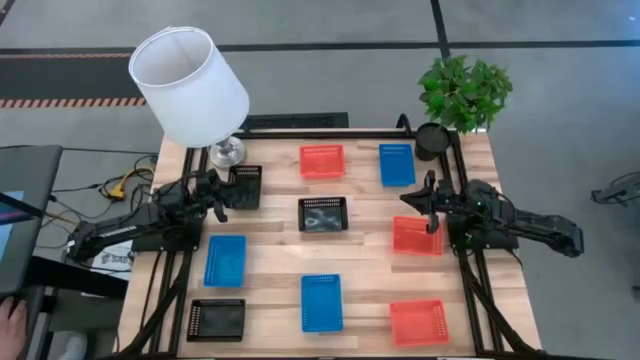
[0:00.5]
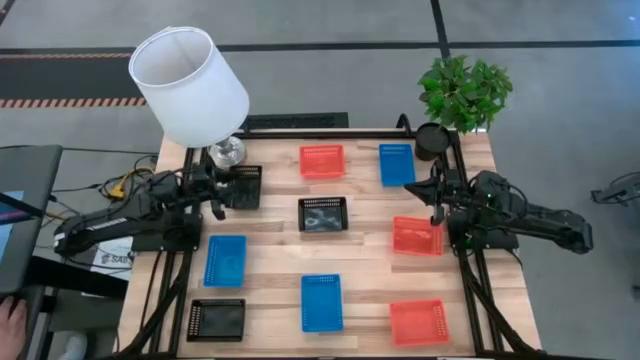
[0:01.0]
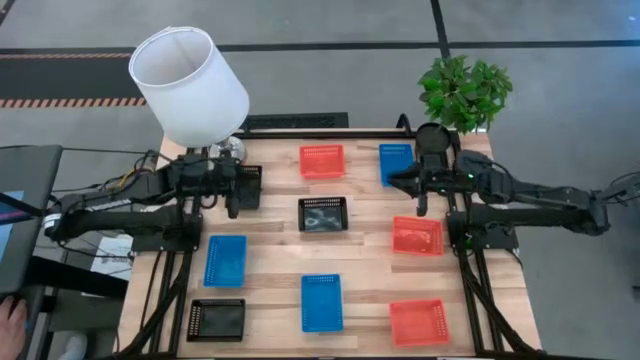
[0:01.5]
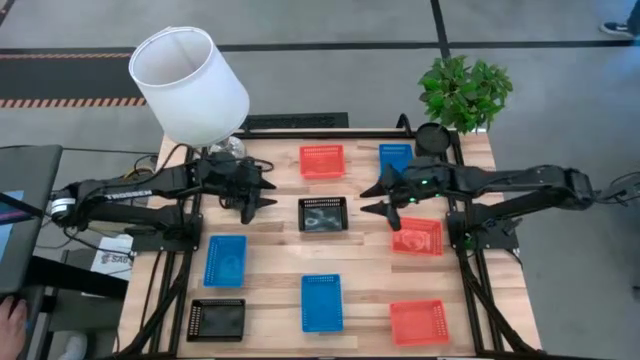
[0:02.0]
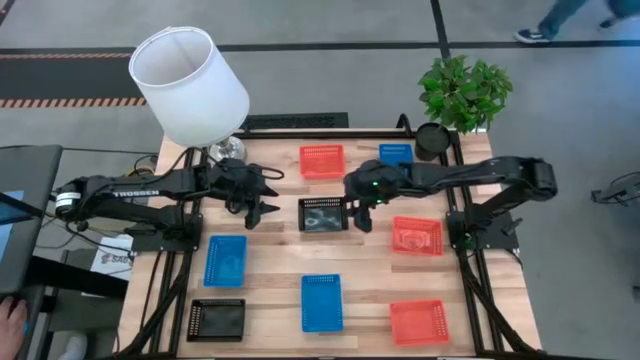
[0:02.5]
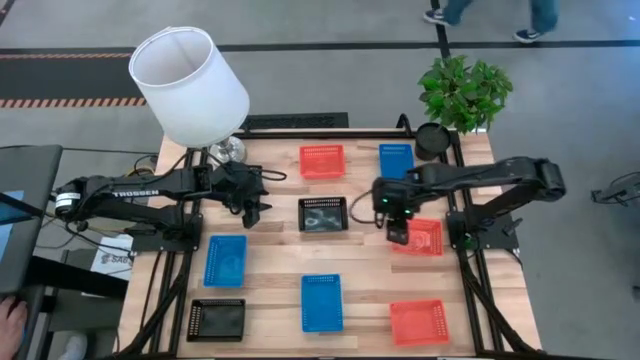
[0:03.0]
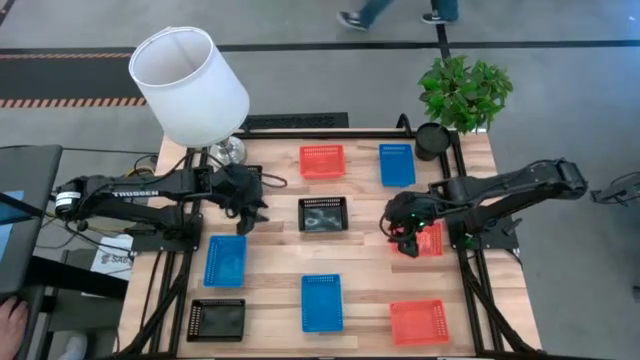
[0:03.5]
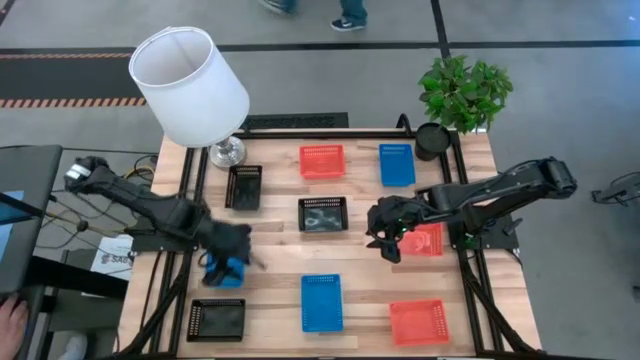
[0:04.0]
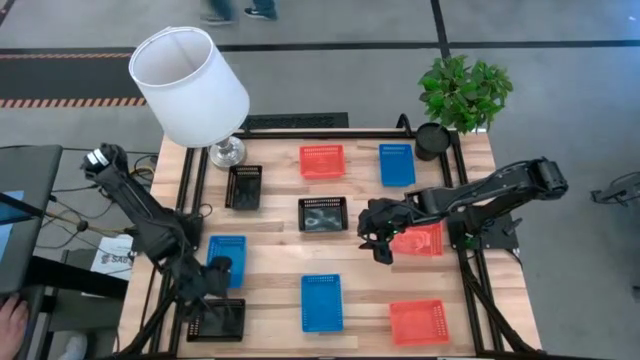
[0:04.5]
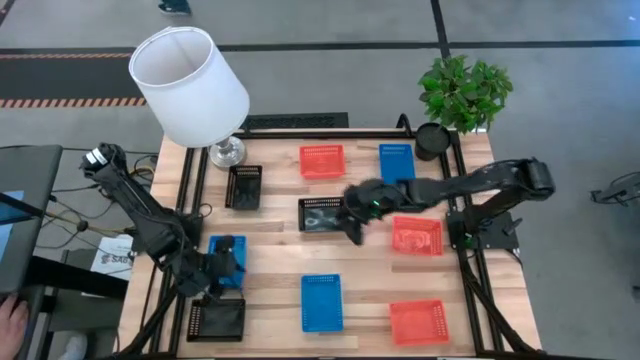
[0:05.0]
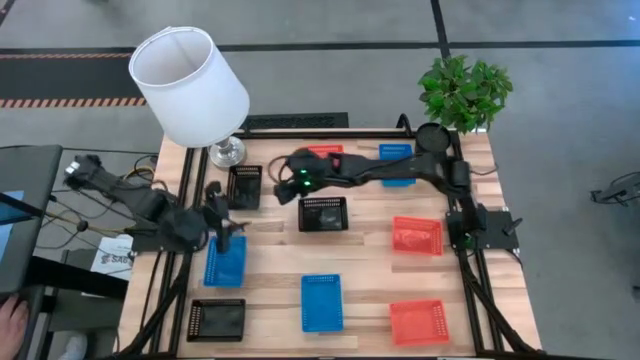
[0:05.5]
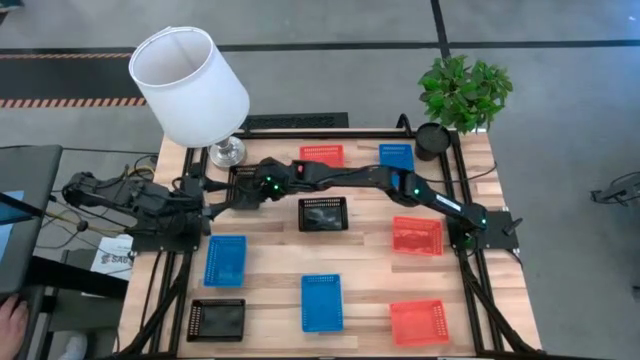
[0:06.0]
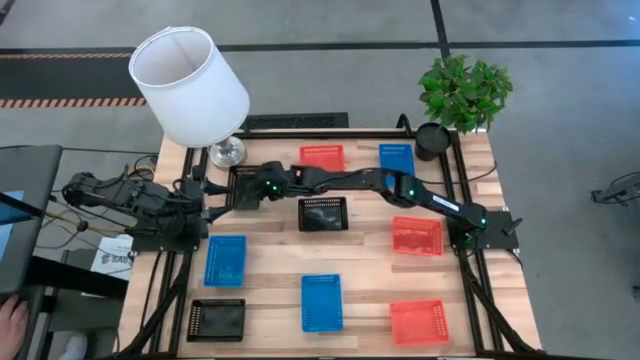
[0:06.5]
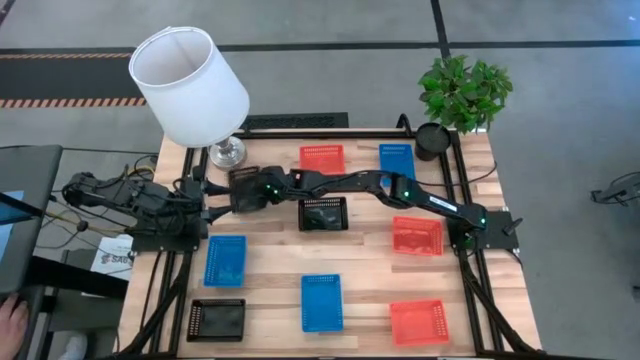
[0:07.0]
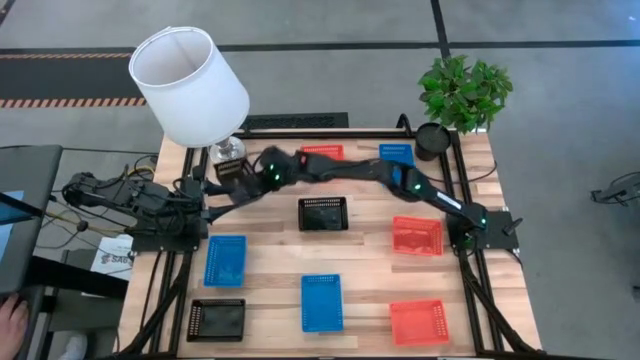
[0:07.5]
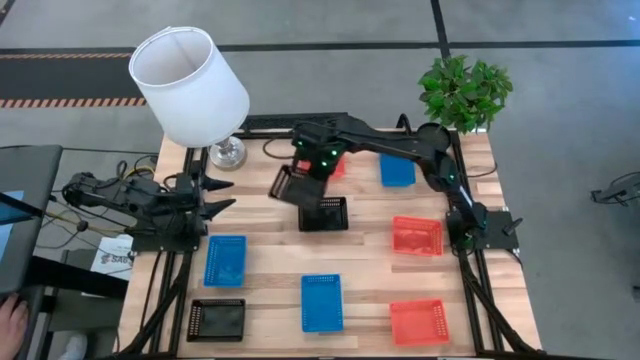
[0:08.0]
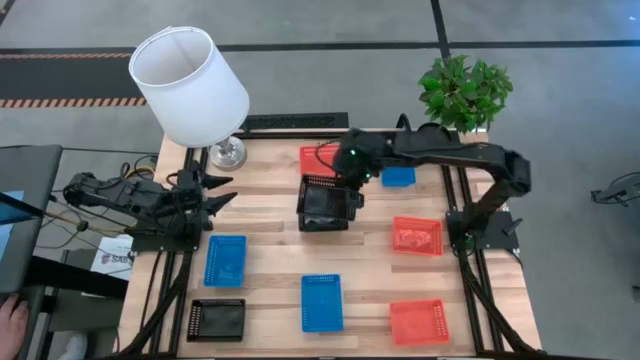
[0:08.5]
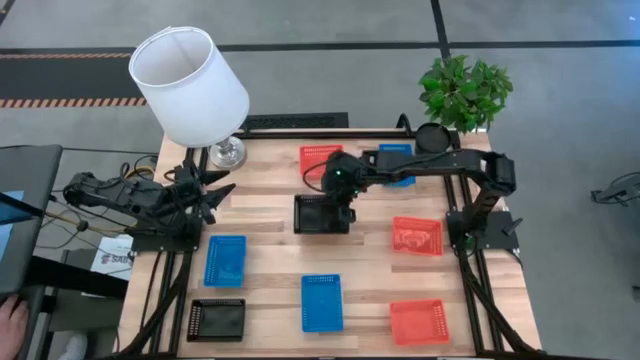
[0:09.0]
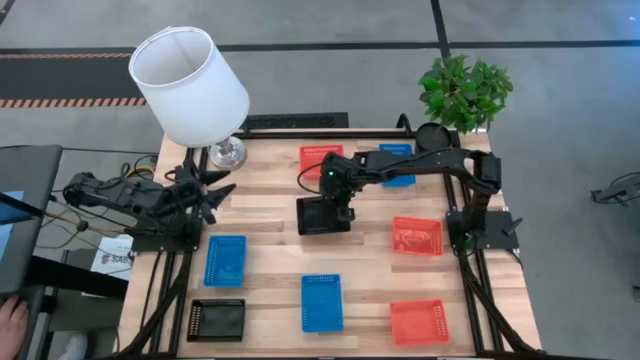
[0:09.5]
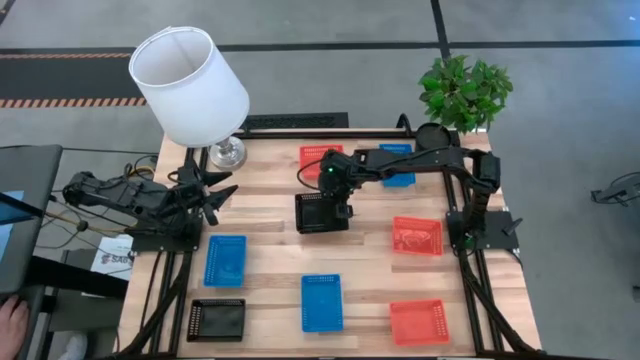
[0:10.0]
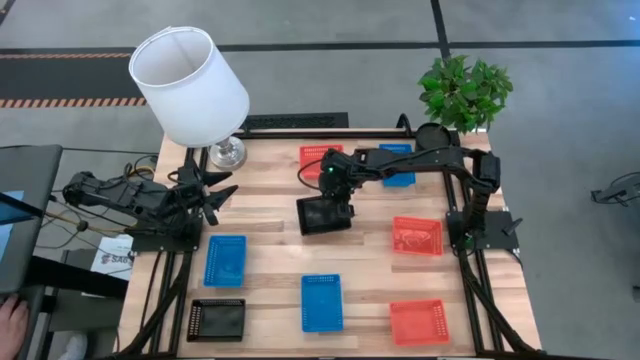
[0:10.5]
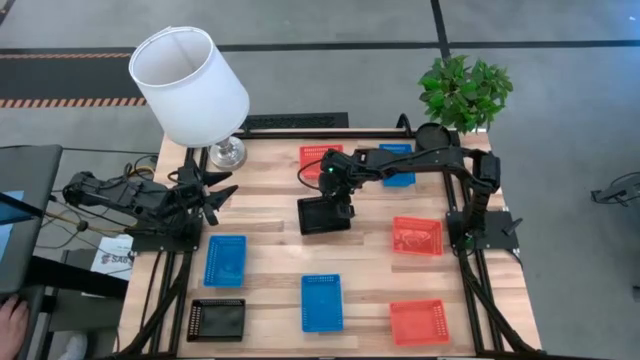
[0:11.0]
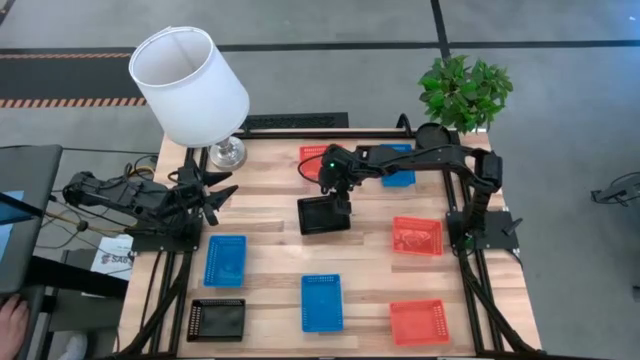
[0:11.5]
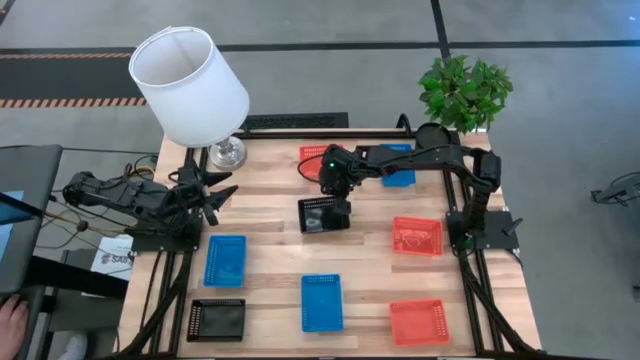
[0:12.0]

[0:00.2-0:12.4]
Stack the top left black bin on the top right black bin

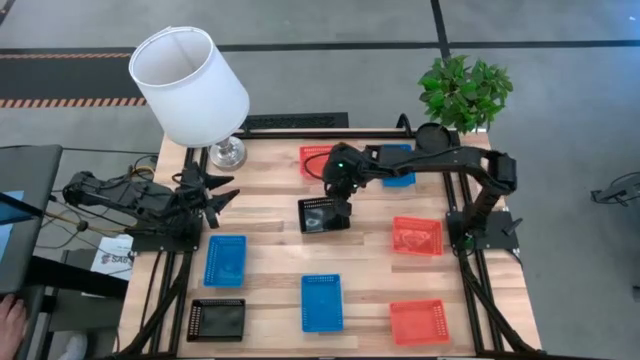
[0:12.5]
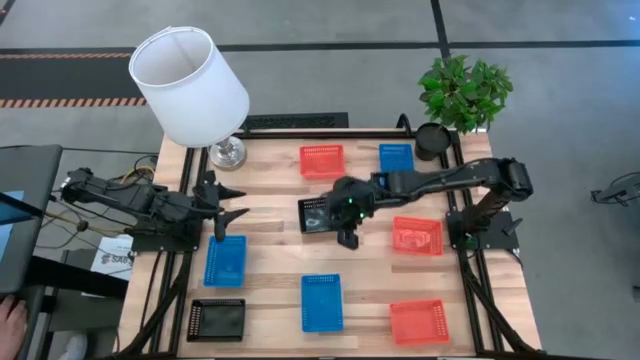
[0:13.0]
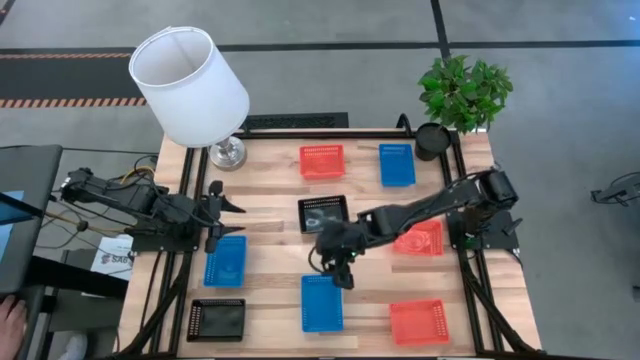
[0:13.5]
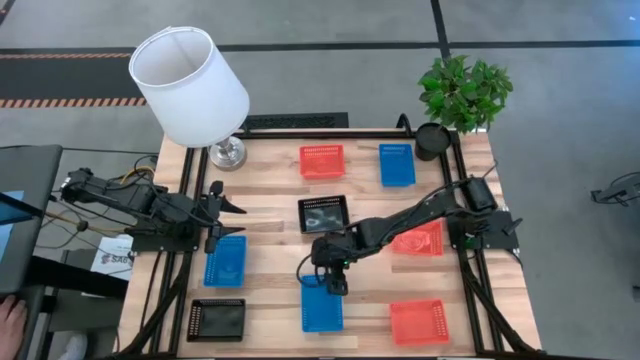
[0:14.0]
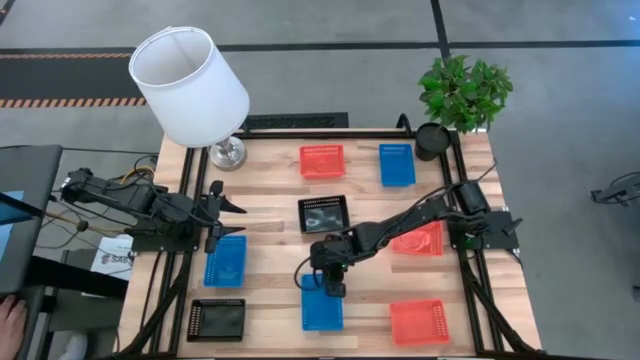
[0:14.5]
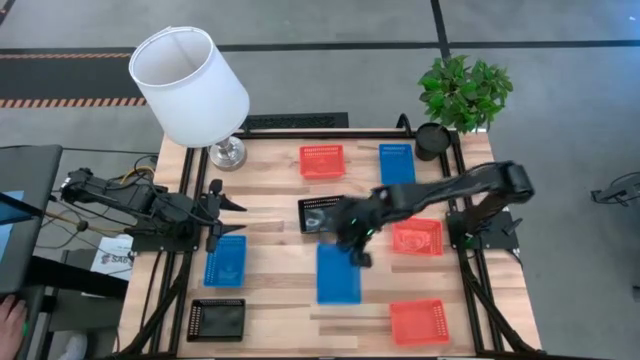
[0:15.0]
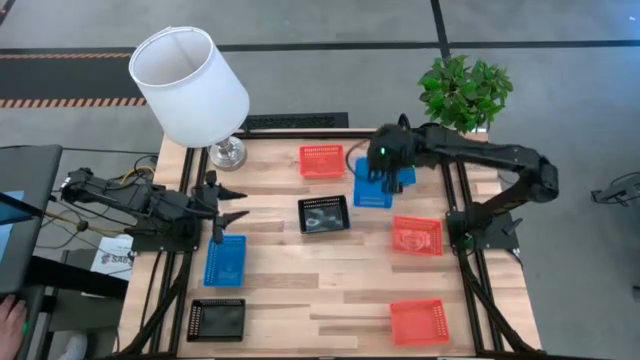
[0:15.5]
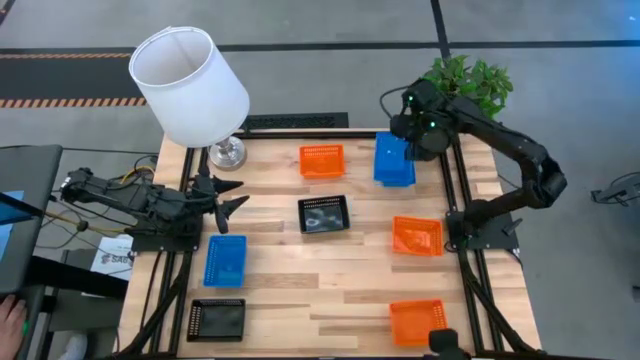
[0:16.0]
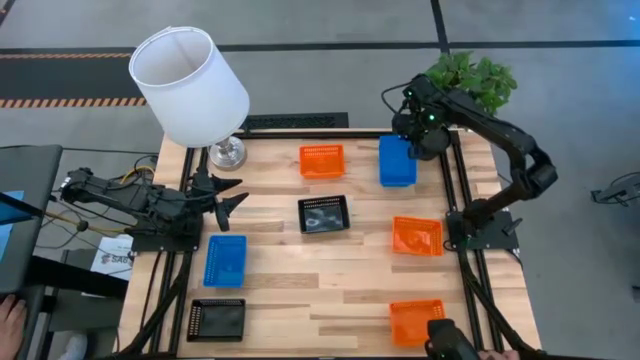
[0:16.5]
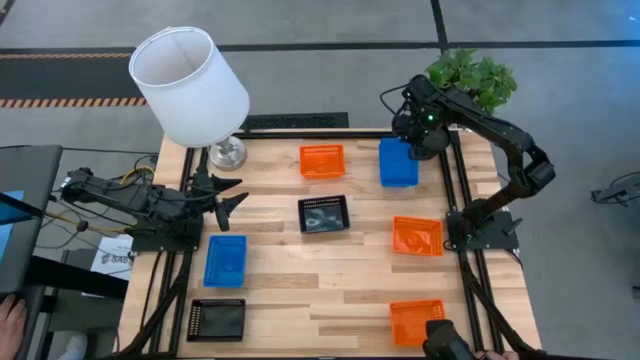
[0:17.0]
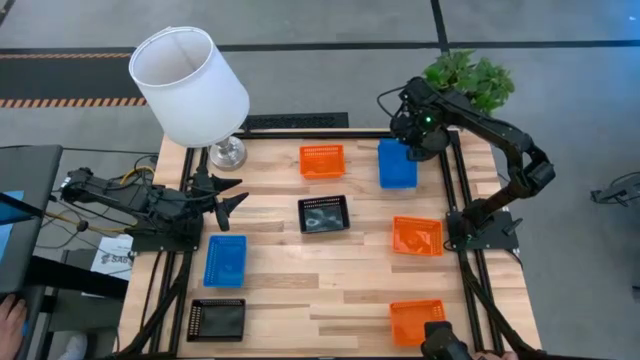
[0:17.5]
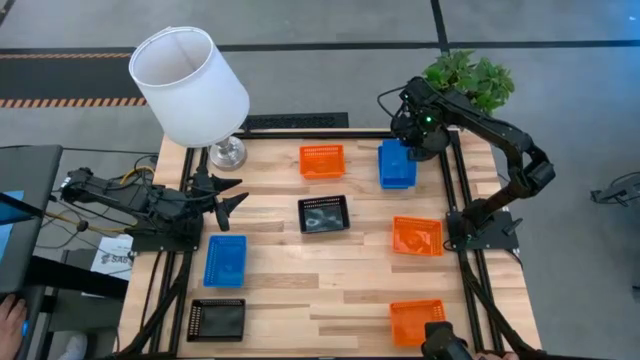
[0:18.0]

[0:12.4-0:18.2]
Stack the bottom blue bin on the top blue bin
